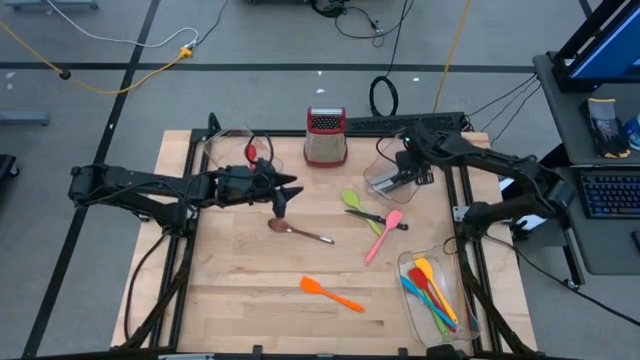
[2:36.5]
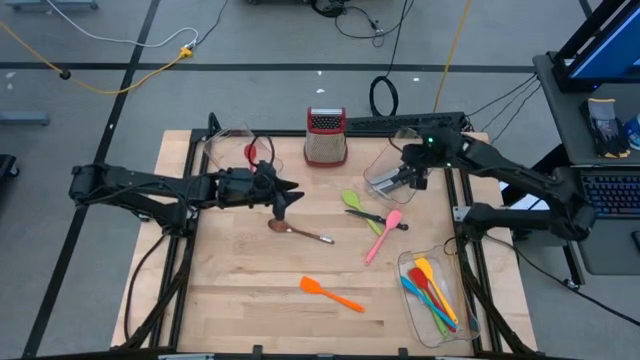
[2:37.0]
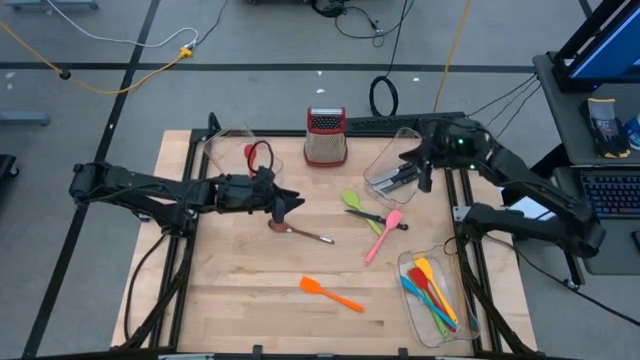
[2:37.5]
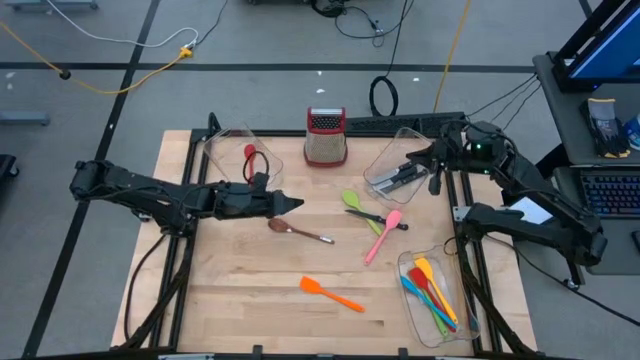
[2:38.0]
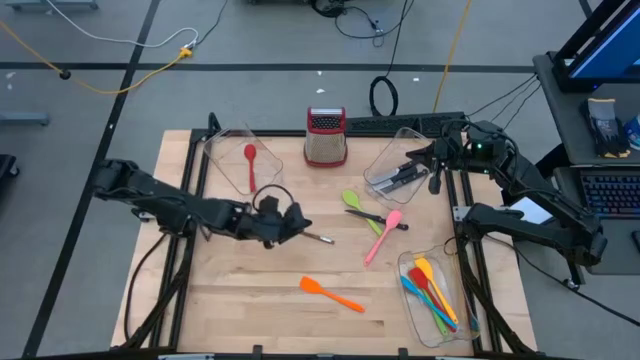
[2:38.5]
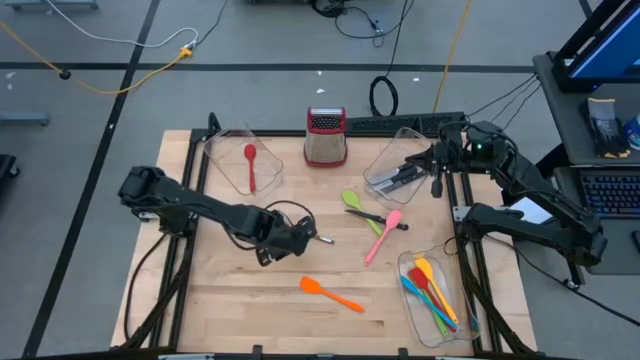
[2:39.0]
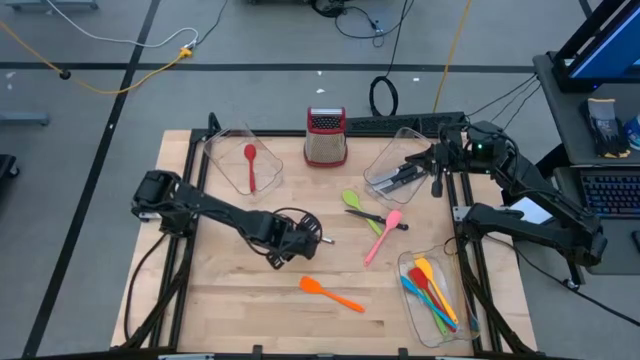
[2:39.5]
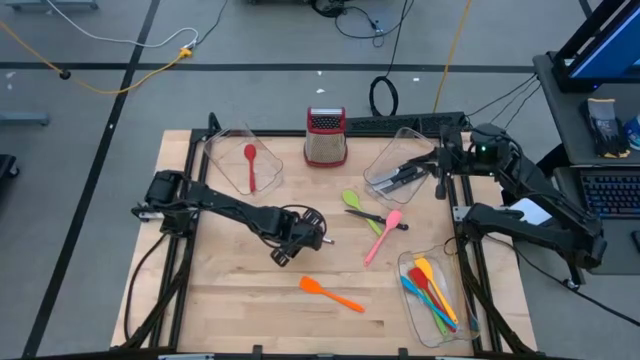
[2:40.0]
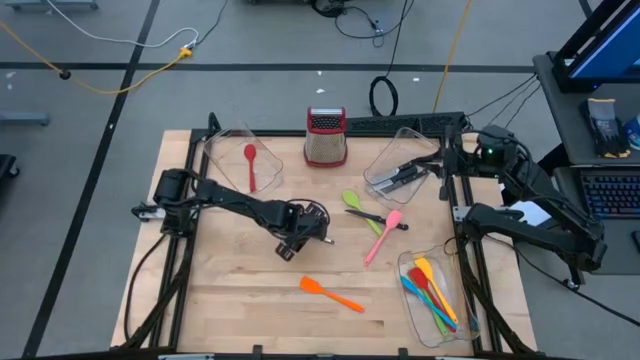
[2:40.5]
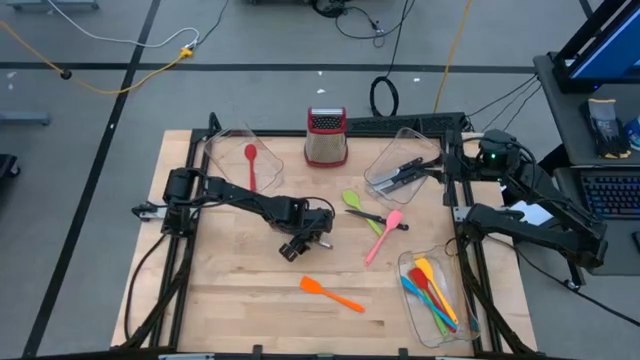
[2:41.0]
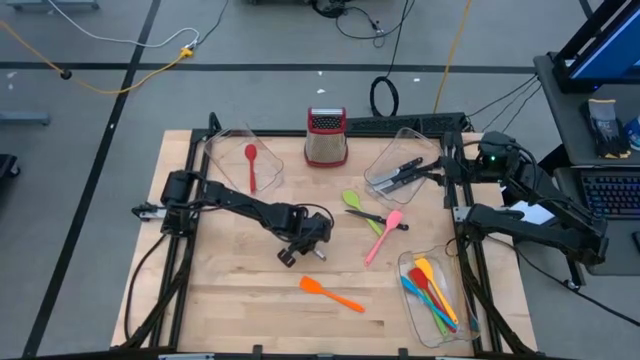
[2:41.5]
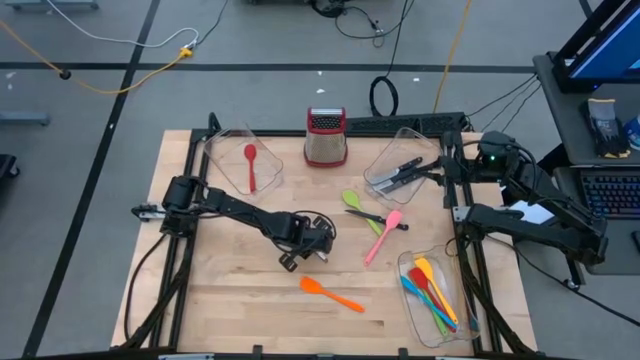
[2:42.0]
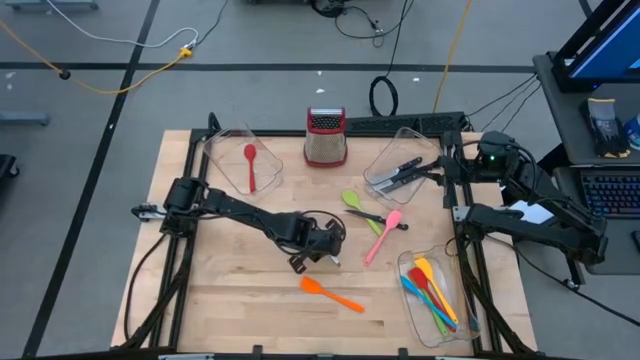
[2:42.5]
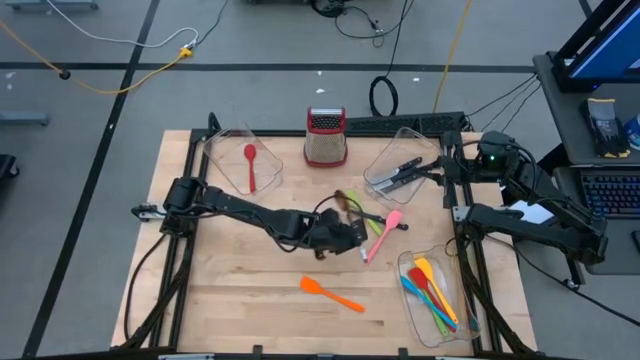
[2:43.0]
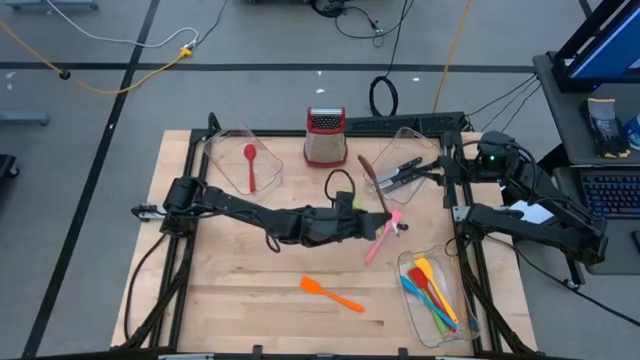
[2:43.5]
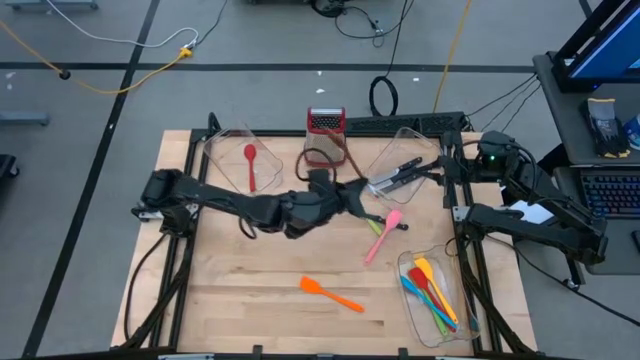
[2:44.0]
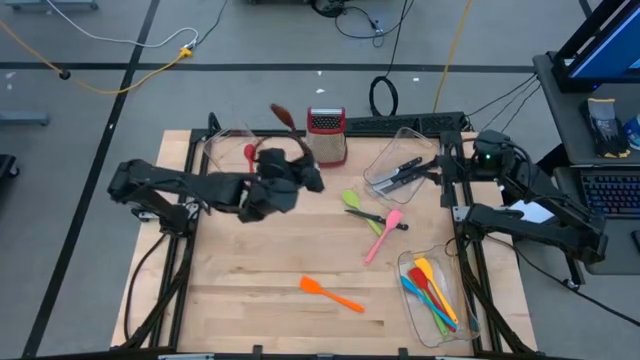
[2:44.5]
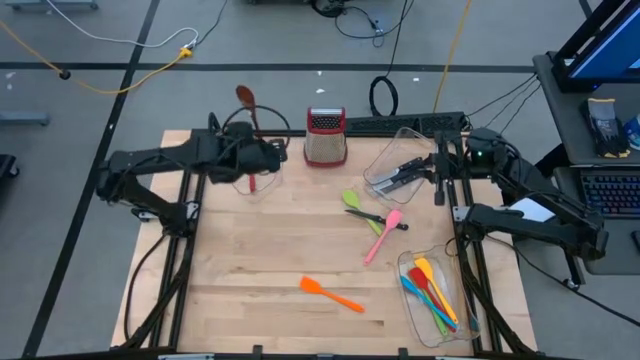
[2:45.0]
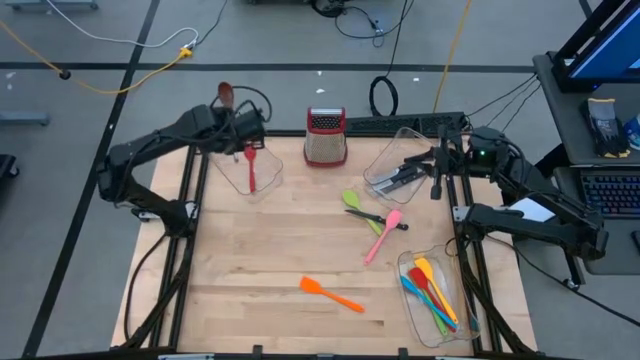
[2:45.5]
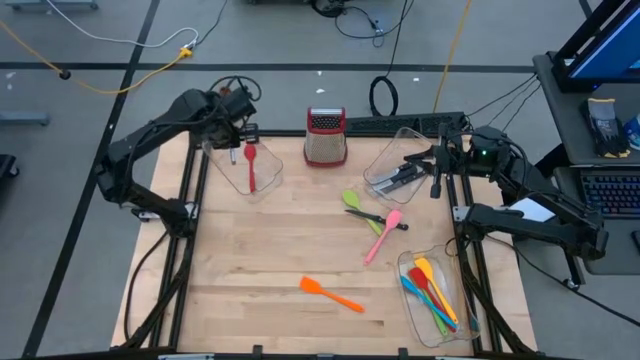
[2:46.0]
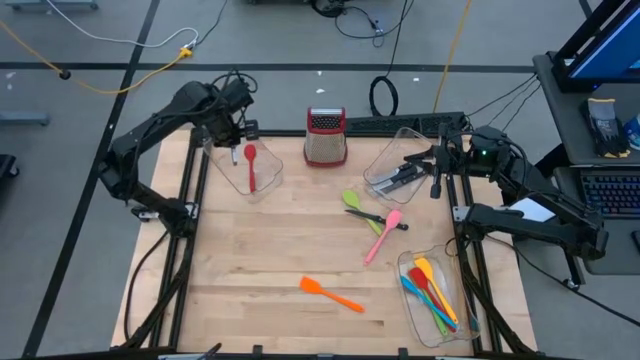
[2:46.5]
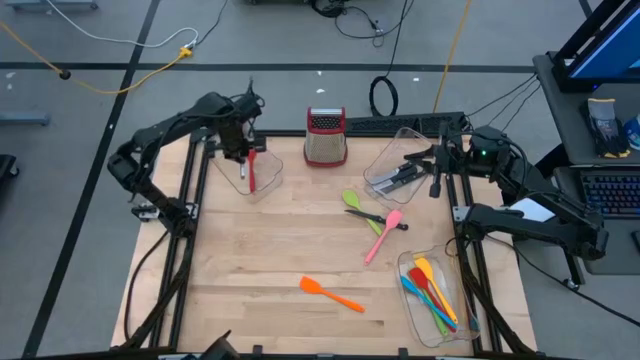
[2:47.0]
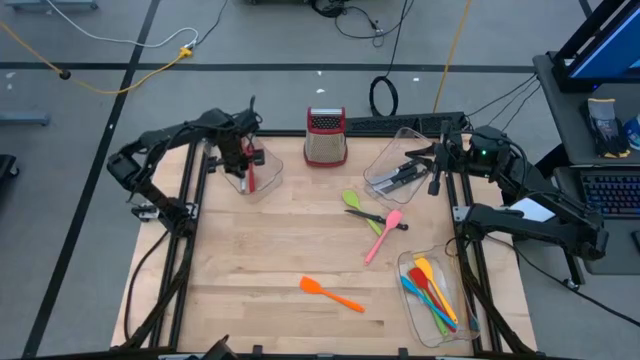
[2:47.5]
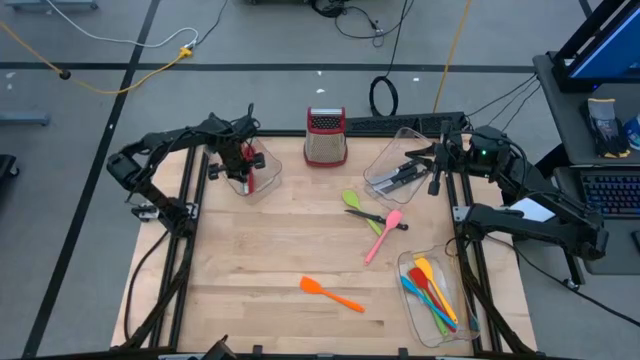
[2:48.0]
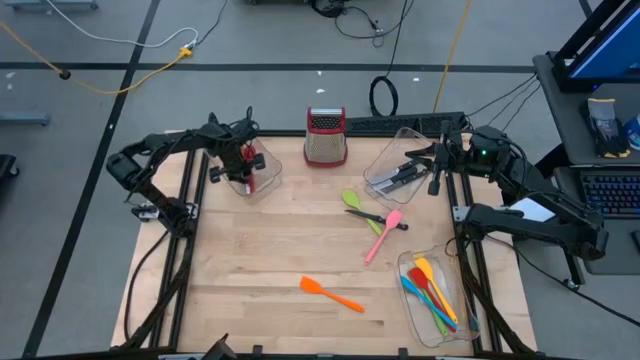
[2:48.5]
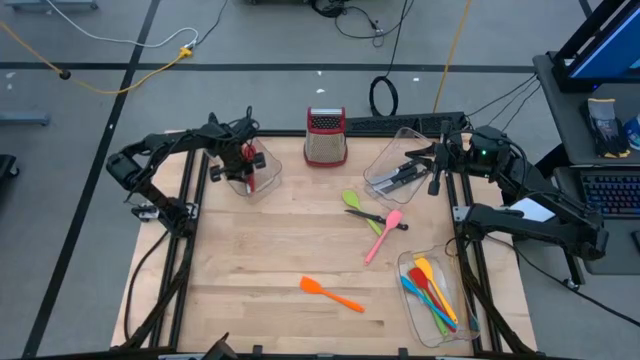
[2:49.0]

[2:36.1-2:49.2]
Task: Pick & Place Kitchen Items
Put the brown serving spoon into the top left transparent bin

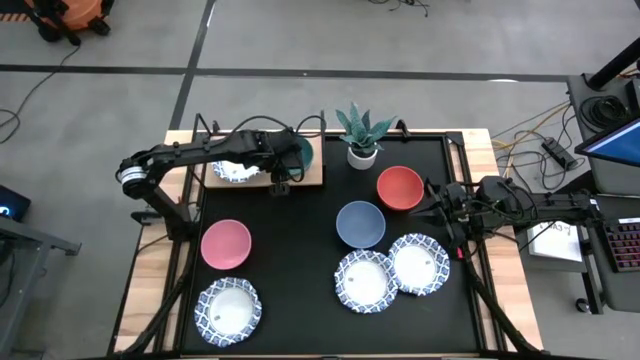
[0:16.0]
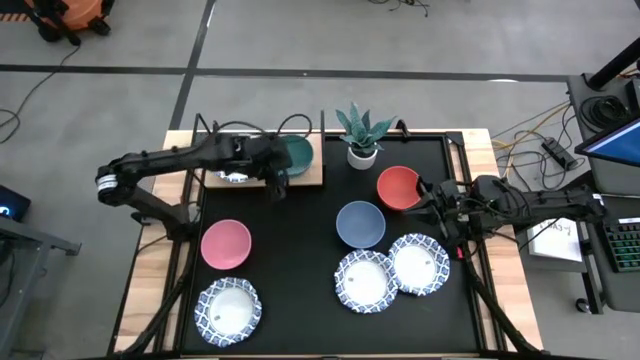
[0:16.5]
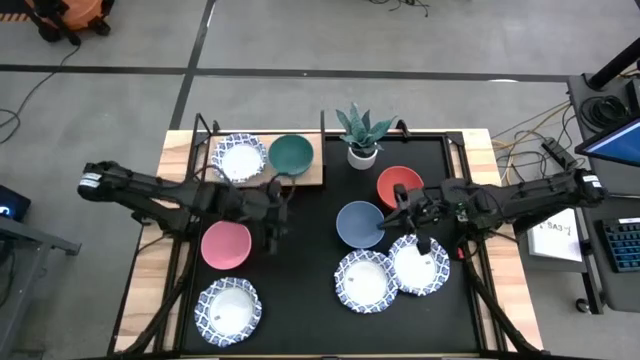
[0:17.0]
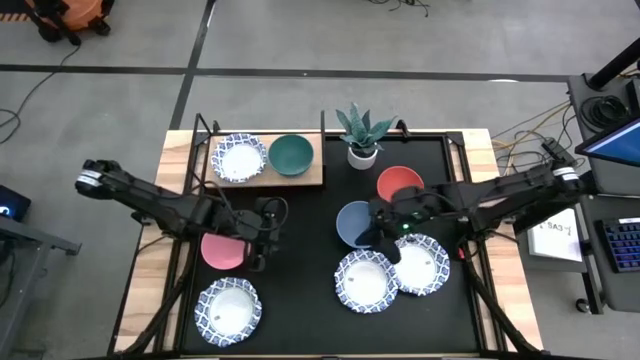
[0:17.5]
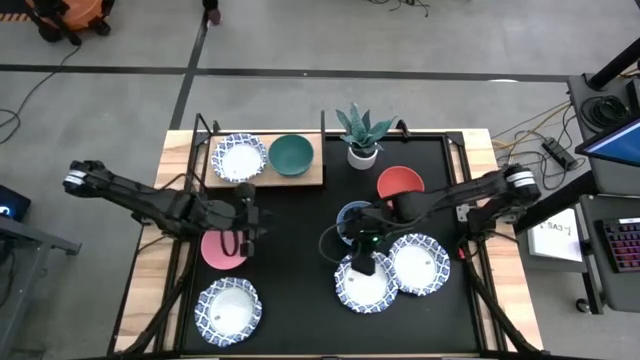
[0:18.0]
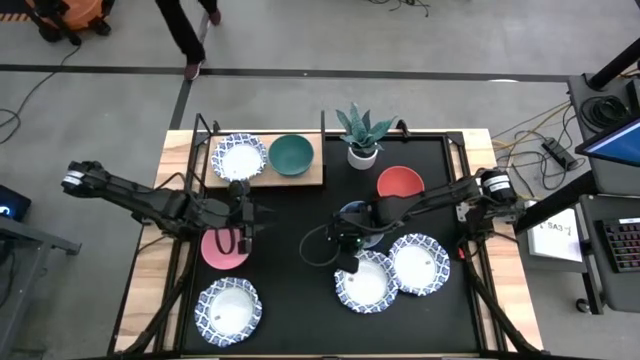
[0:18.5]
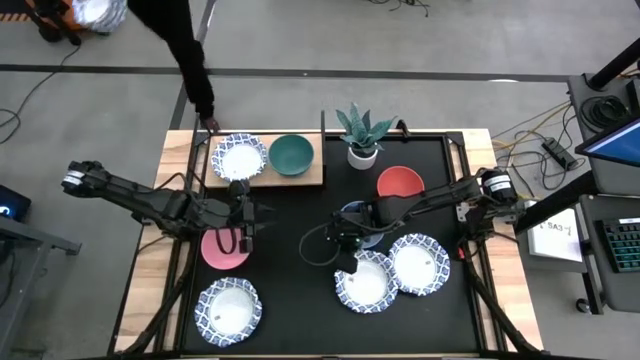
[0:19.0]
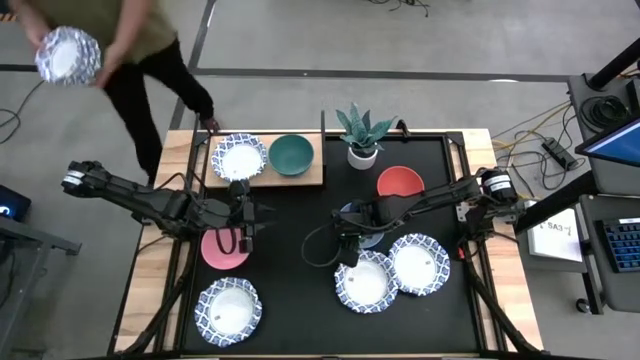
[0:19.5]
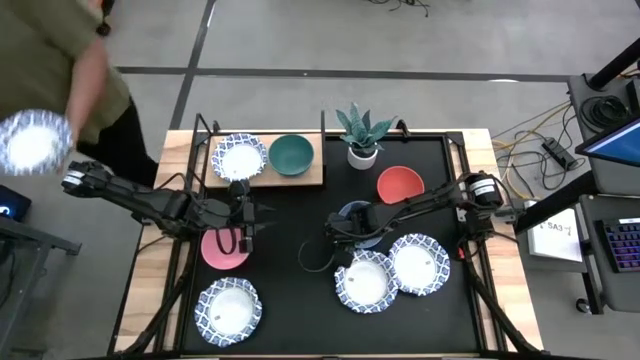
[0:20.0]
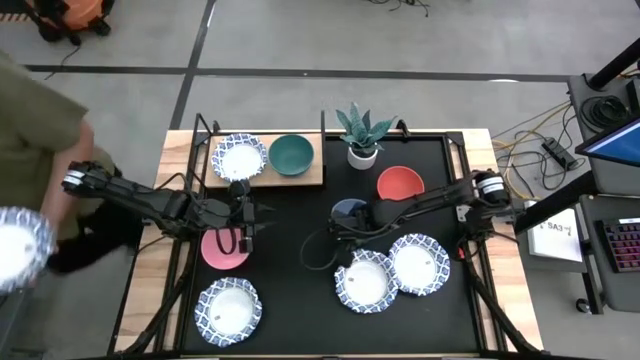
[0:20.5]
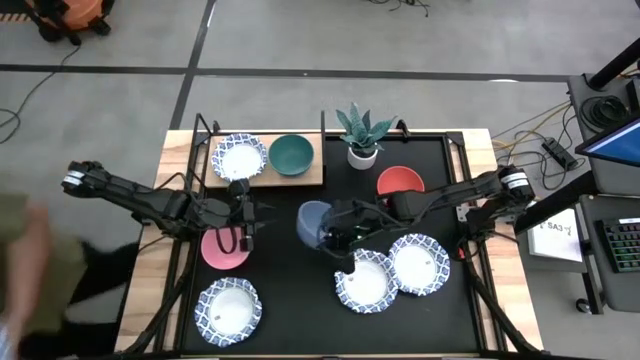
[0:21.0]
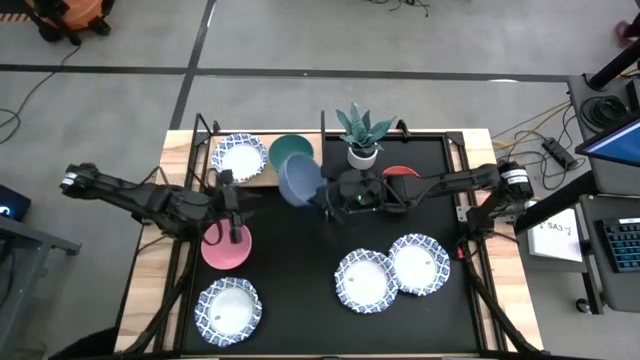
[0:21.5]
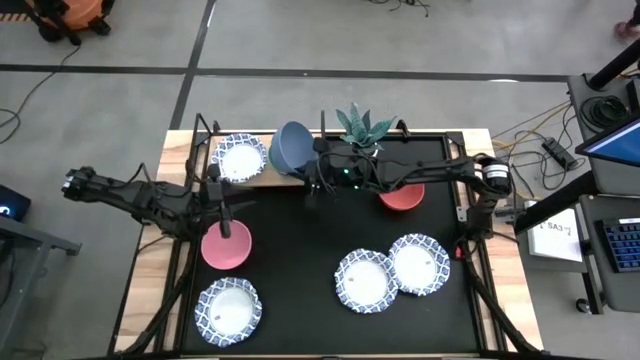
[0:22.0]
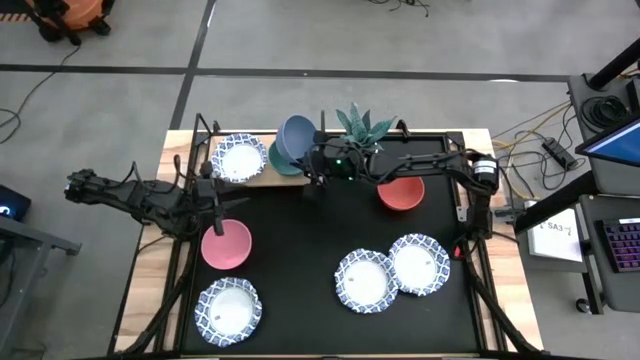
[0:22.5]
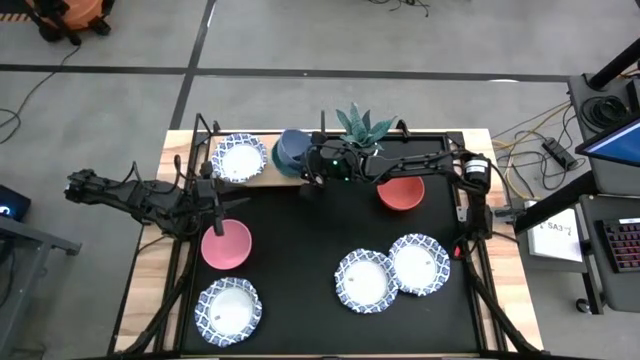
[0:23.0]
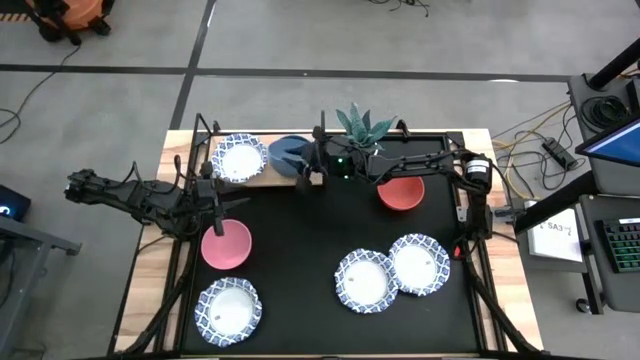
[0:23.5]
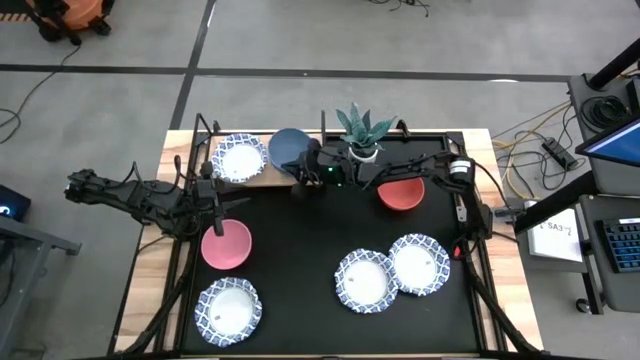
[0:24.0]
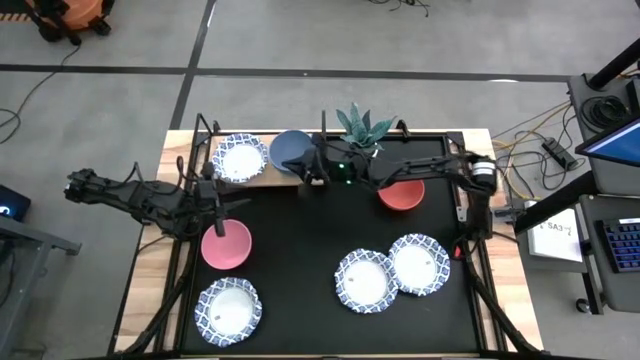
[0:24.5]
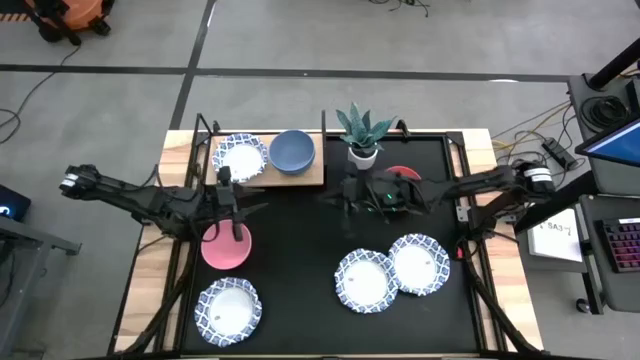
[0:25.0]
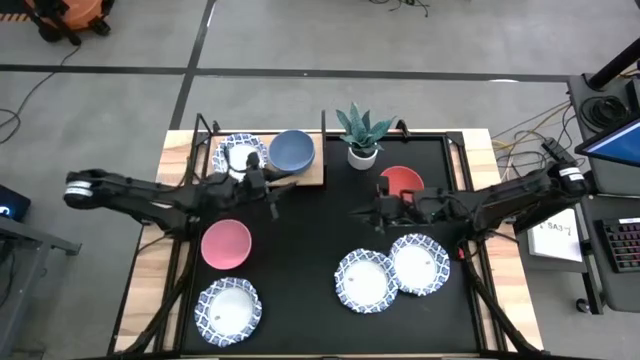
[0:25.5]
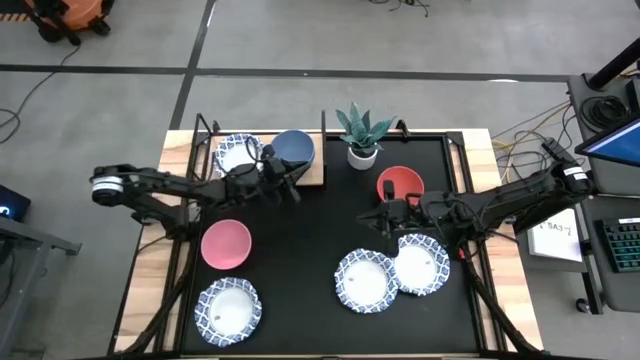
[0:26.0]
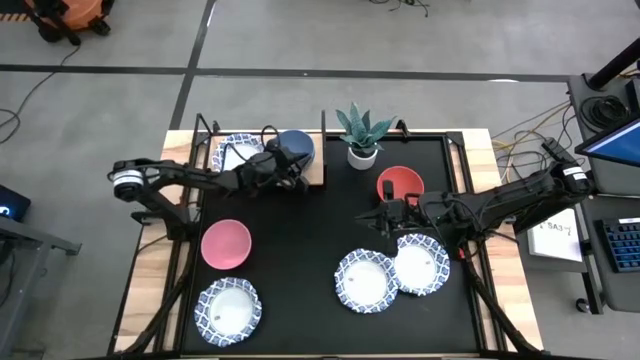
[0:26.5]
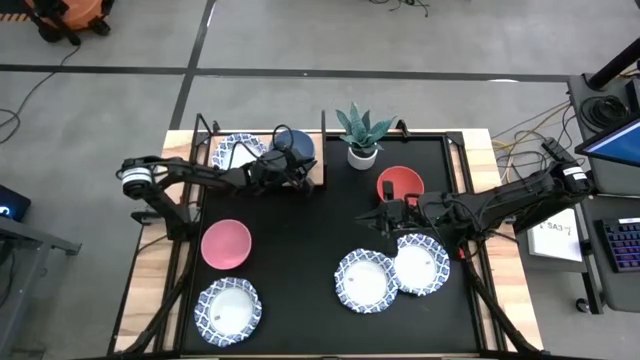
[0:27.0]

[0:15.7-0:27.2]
Task: Place and stack bowls onto a shelf
Stack the blue bowl on top of the green bowl on the shelf
